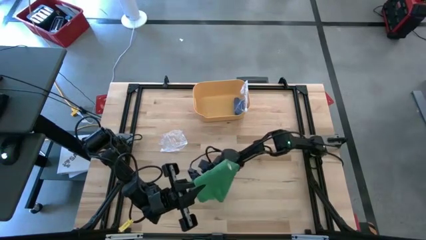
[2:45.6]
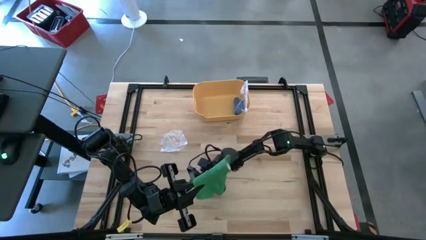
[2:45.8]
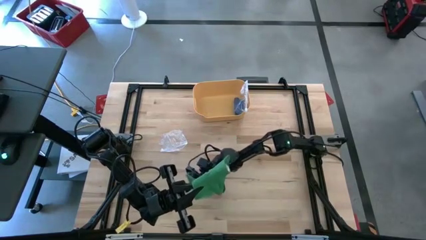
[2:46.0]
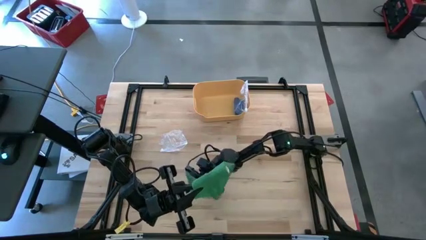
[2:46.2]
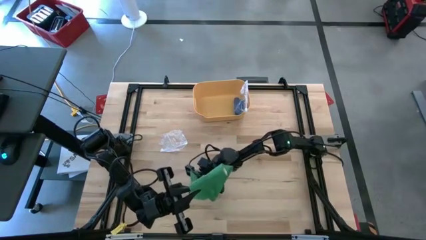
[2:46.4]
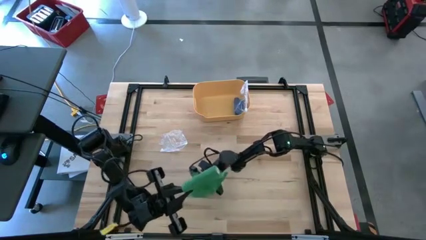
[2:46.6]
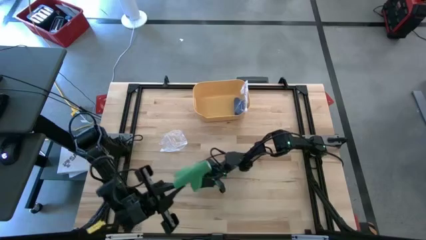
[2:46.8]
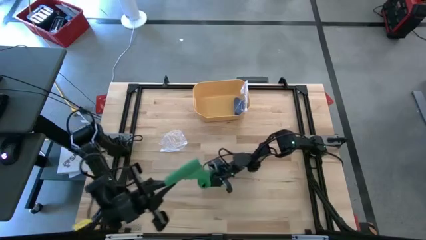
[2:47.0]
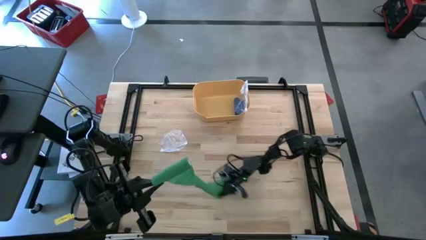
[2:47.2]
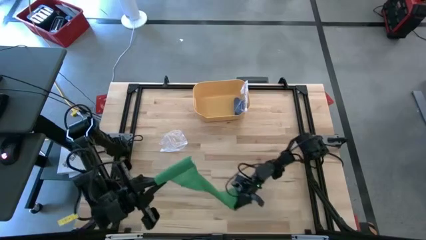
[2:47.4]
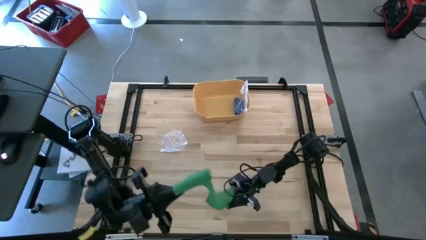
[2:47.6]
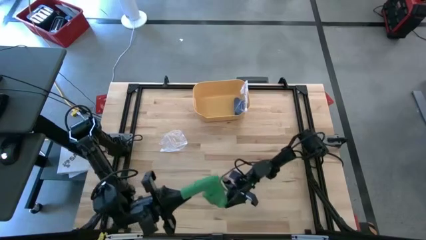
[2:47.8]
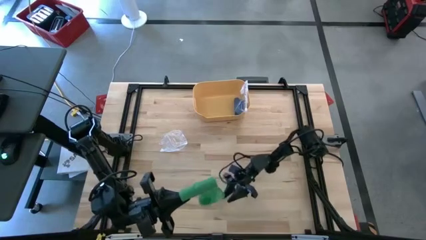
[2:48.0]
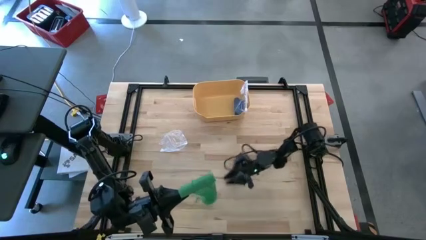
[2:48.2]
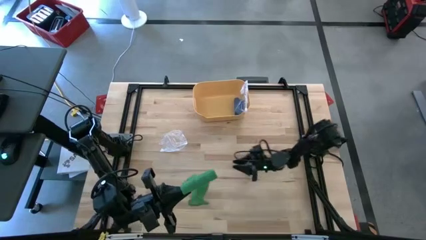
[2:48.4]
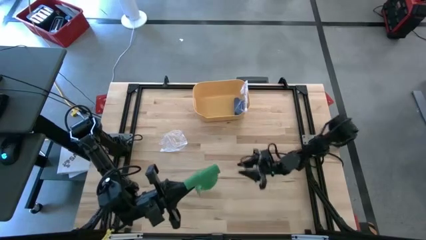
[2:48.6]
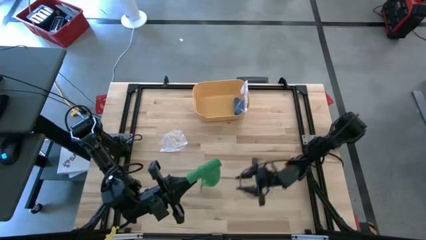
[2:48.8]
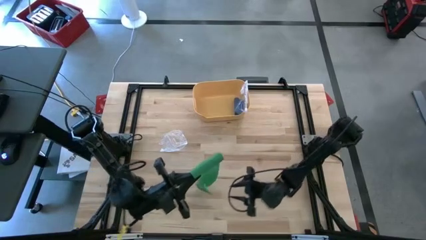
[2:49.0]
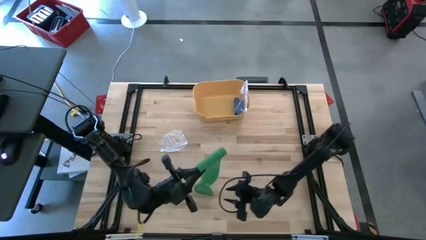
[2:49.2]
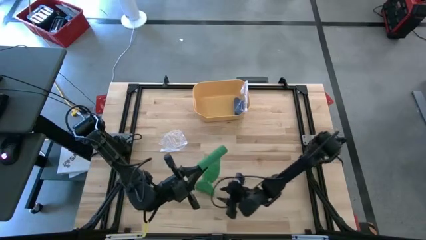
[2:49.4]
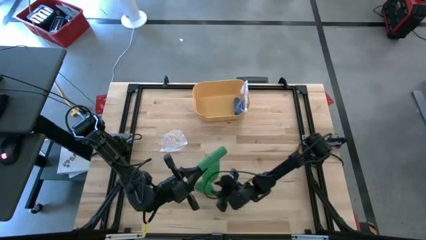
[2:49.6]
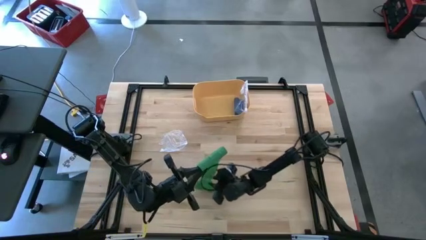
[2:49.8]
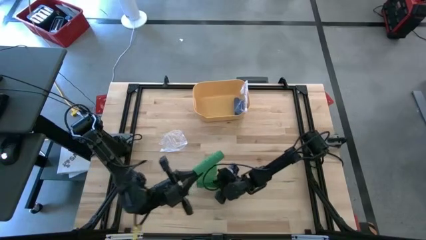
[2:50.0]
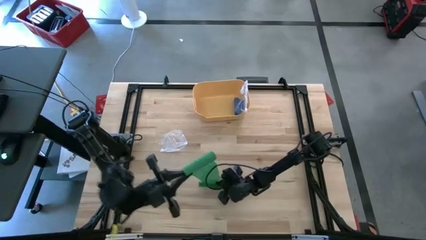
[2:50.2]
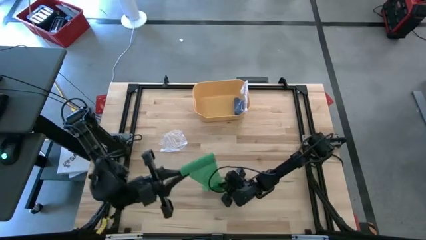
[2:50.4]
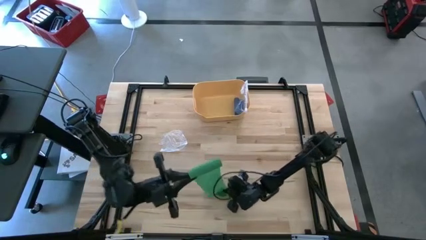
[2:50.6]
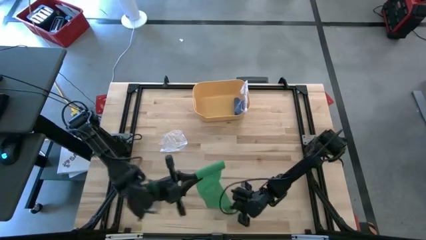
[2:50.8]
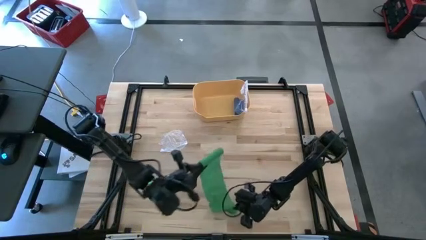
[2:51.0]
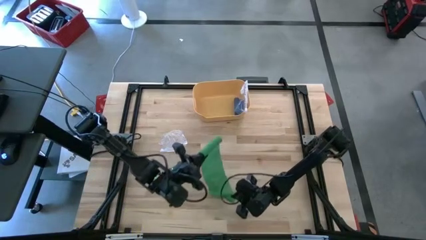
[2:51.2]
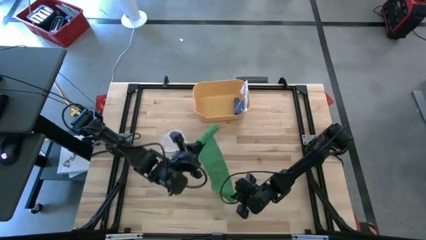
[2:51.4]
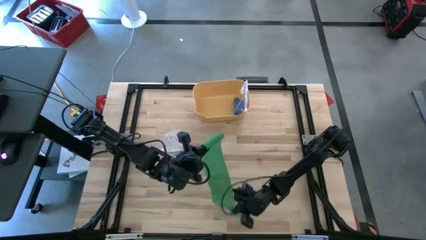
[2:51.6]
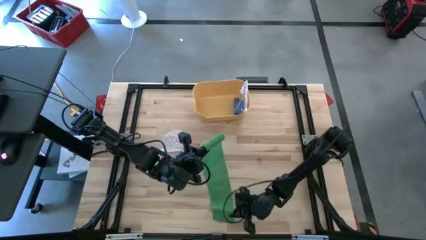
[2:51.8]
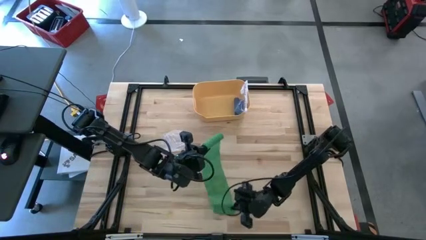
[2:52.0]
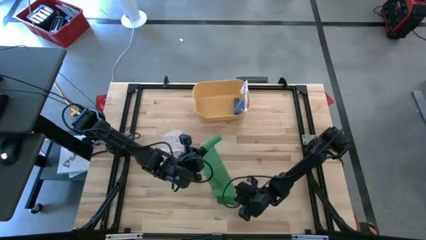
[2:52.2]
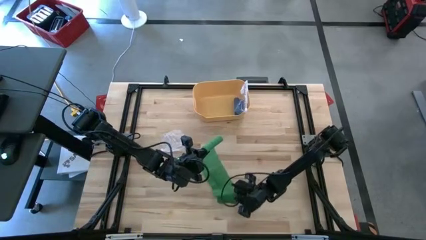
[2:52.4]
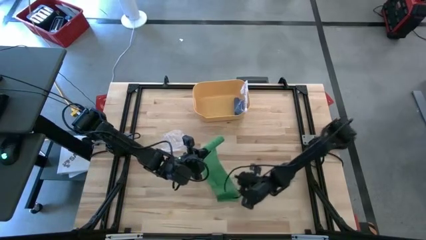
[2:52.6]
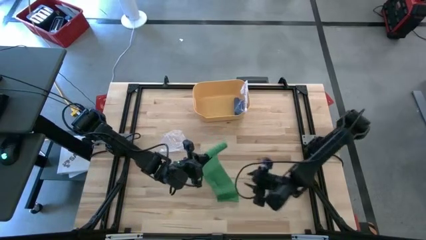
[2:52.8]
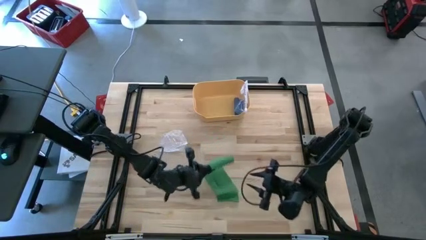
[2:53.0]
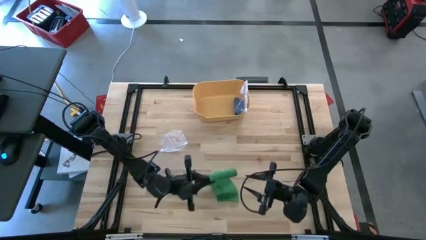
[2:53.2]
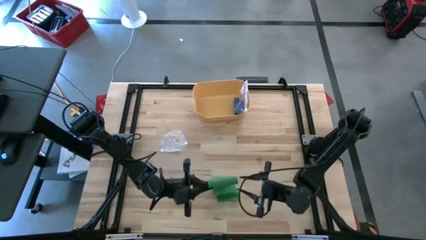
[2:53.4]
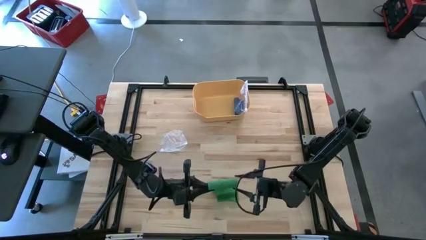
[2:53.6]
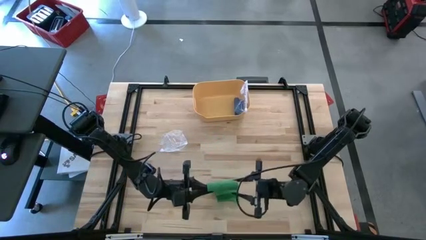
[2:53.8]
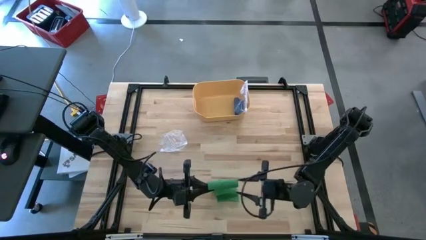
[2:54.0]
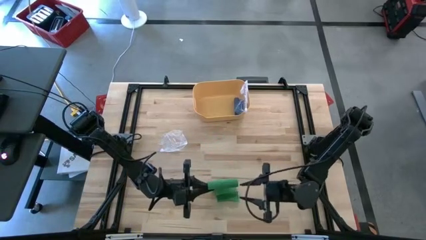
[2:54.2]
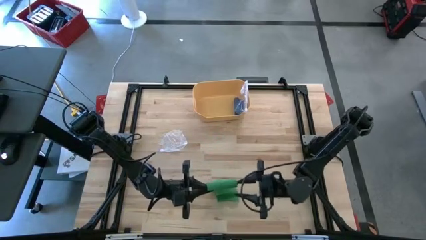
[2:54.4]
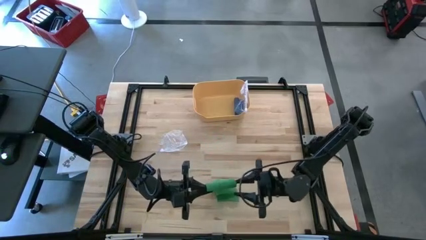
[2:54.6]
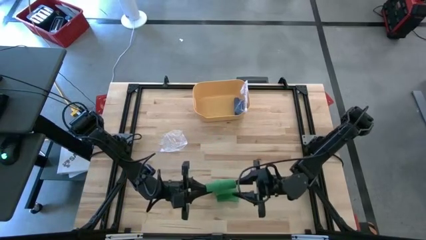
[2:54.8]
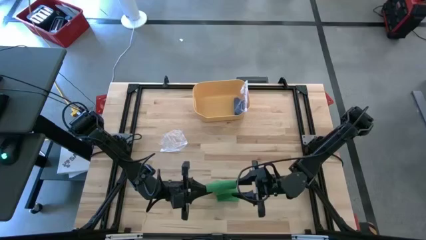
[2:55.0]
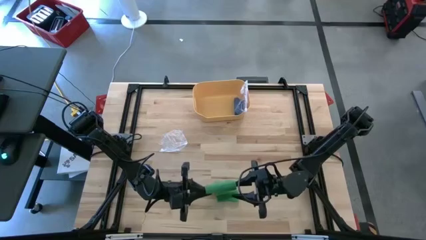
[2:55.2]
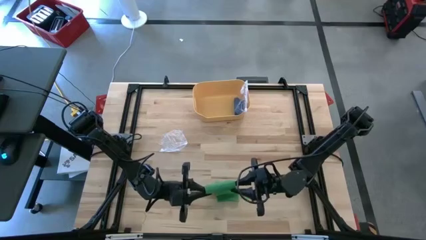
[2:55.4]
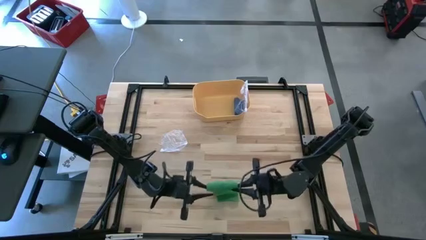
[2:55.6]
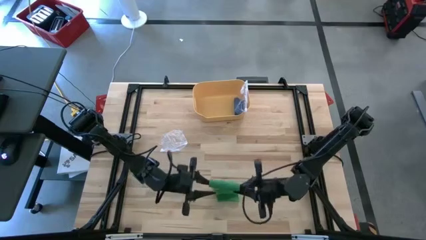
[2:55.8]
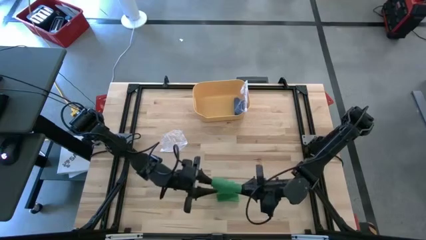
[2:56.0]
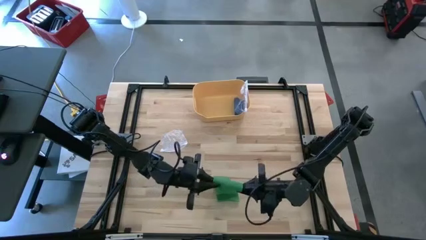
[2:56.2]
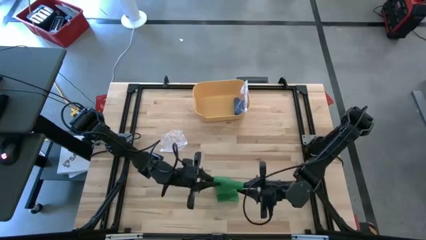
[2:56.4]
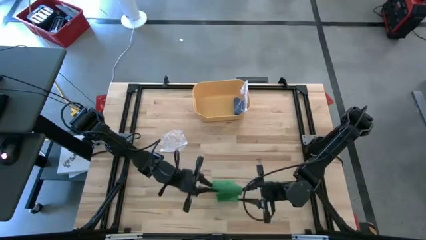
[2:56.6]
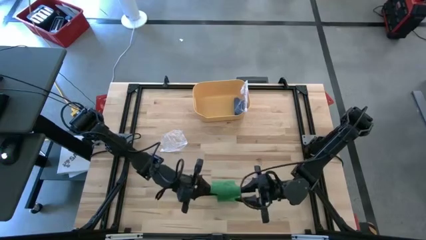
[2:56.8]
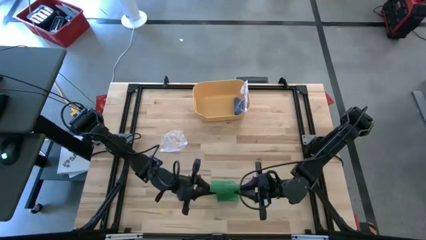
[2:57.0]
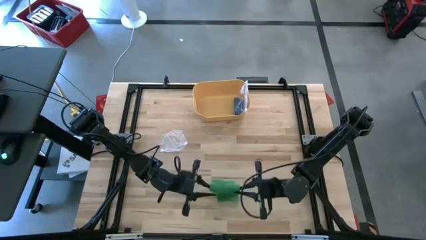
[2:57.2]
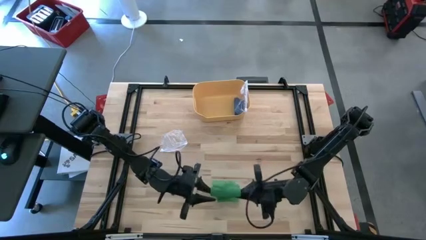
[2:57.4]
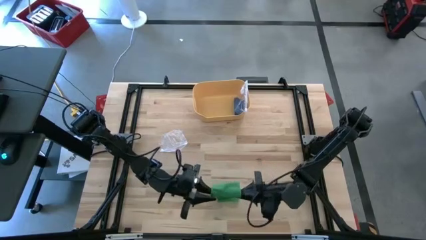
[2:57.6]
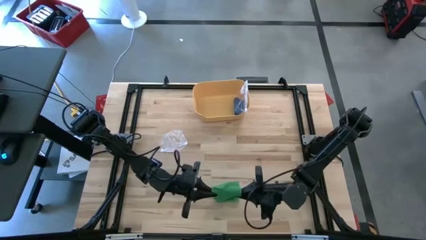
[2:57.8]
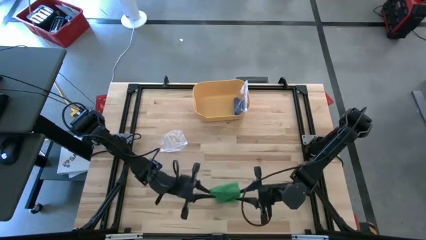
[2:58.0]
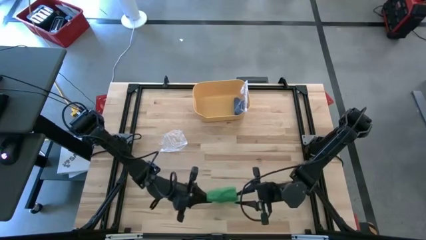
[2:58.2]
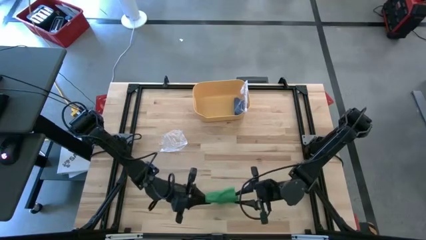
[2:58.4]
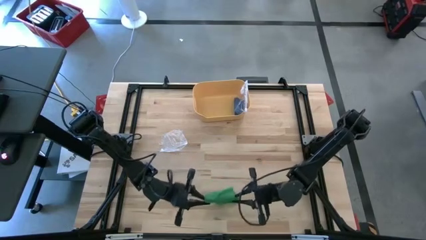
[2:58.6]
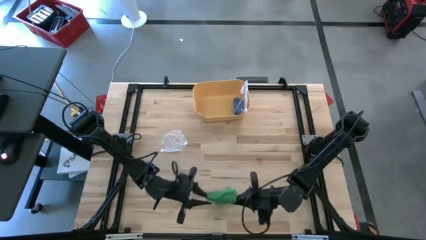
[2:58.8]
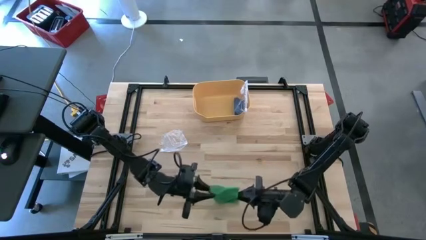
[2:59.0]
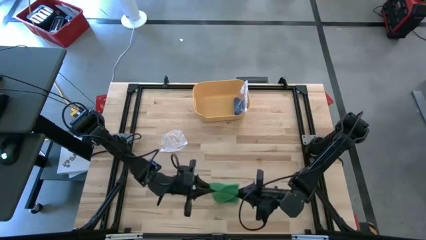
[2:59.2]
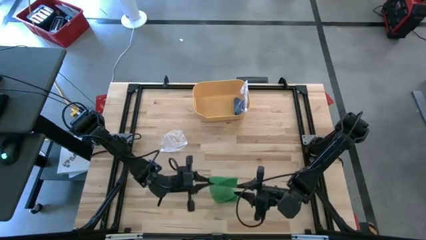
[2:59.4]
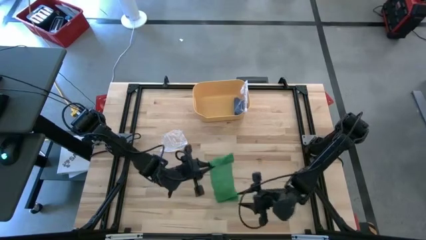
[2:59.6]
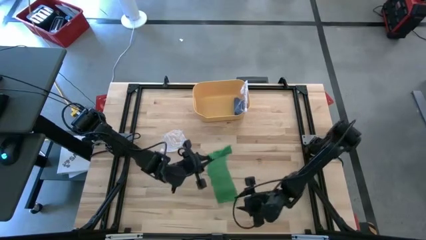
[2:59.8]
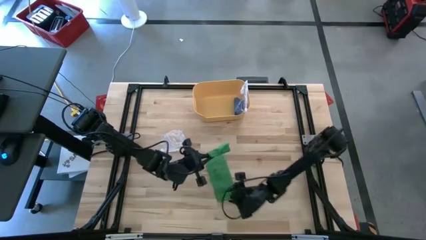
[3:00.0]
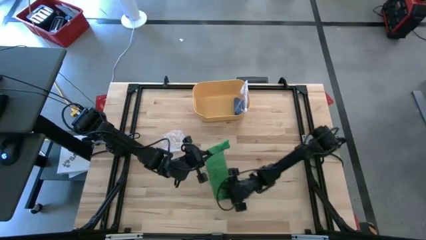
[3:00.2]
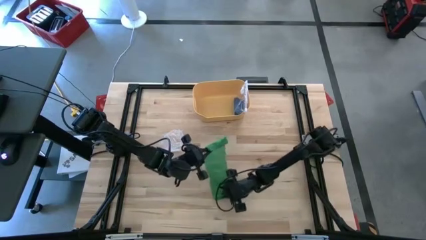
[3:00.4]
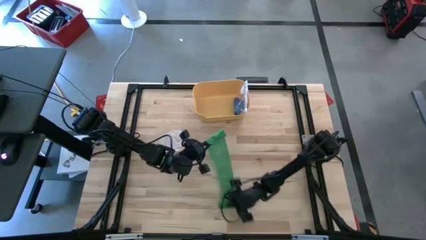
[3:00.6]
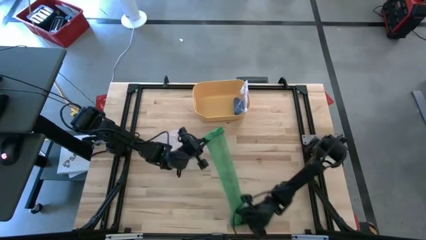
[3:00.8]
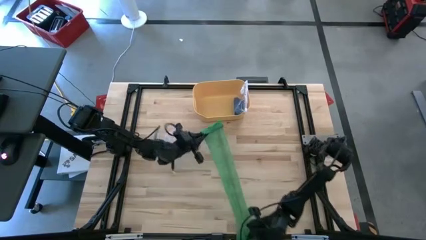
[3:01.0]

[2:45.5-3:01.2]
Task: Roll bandage
Roll the green bandage
